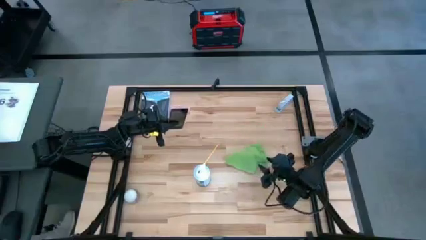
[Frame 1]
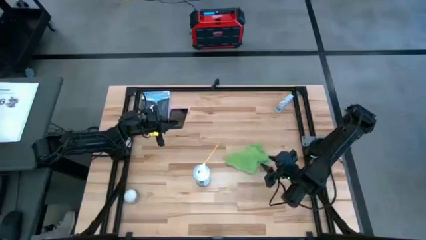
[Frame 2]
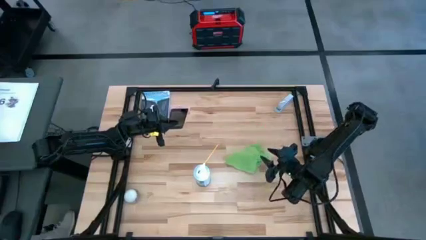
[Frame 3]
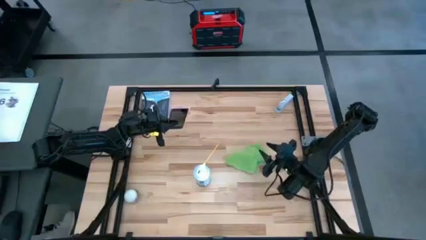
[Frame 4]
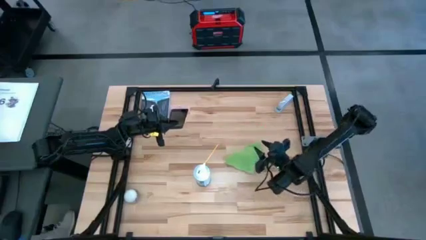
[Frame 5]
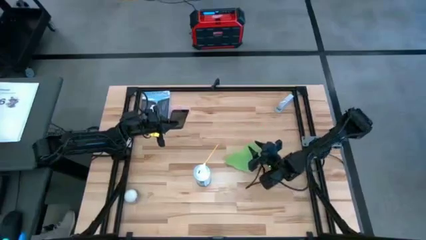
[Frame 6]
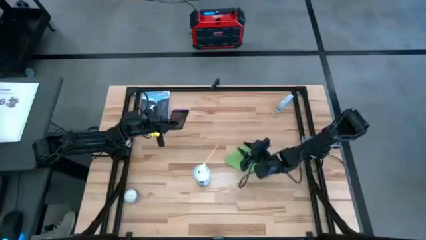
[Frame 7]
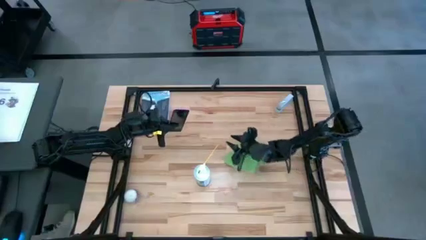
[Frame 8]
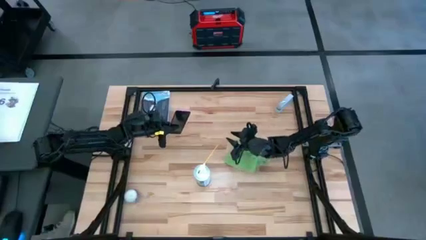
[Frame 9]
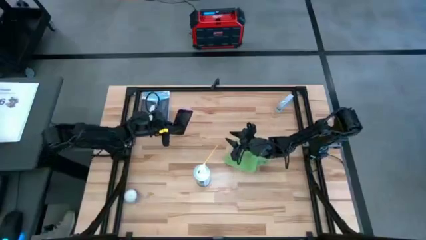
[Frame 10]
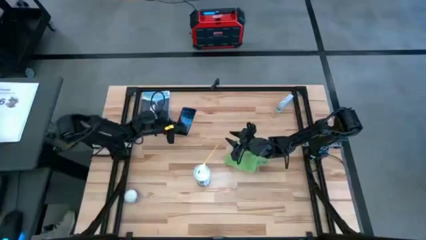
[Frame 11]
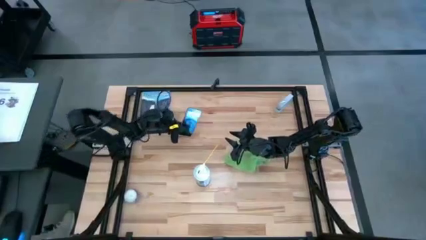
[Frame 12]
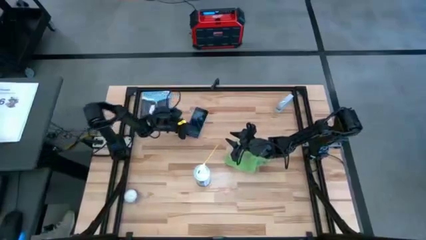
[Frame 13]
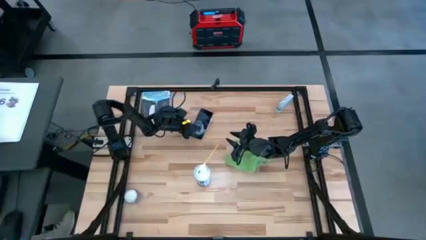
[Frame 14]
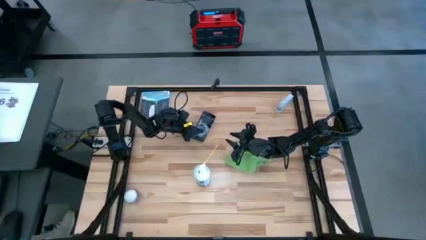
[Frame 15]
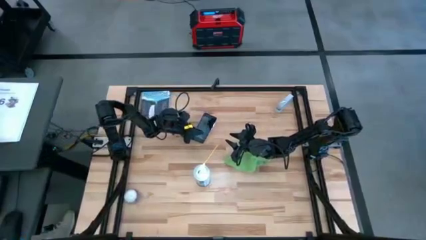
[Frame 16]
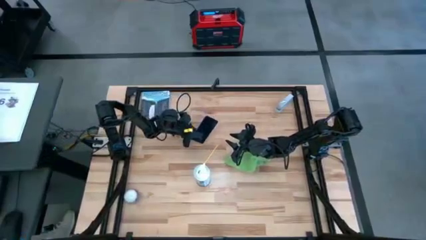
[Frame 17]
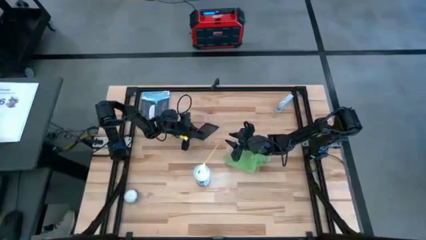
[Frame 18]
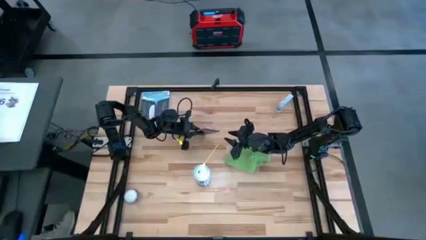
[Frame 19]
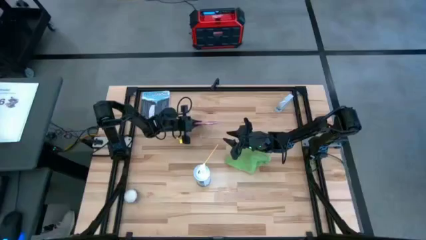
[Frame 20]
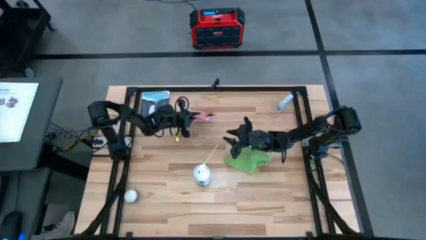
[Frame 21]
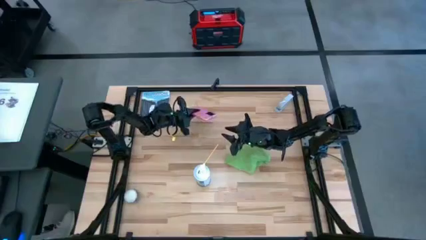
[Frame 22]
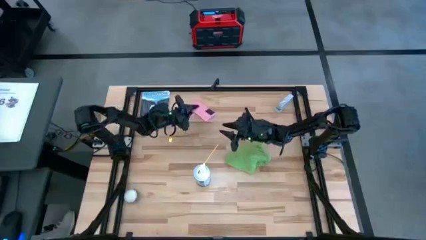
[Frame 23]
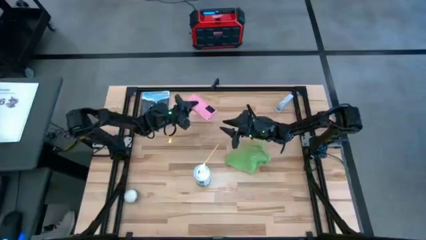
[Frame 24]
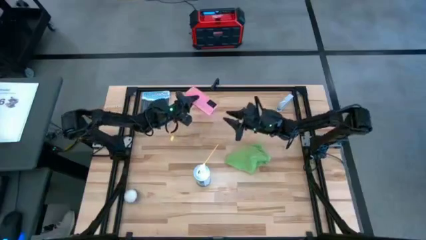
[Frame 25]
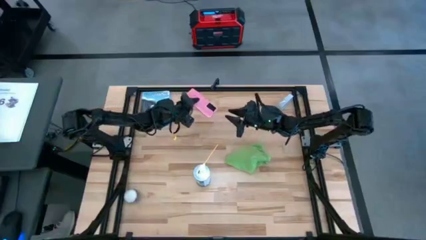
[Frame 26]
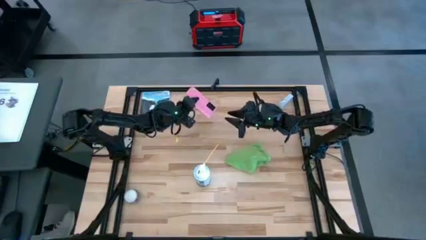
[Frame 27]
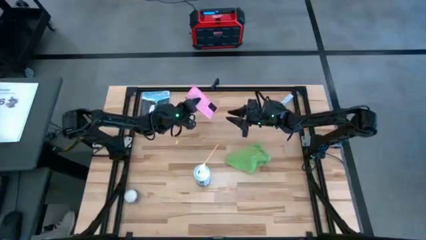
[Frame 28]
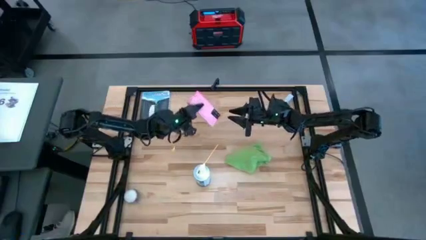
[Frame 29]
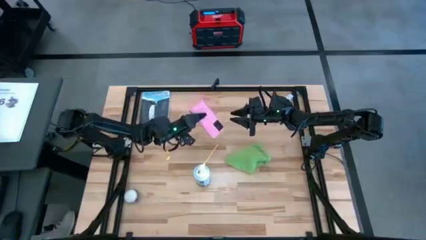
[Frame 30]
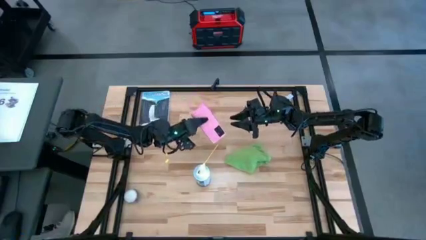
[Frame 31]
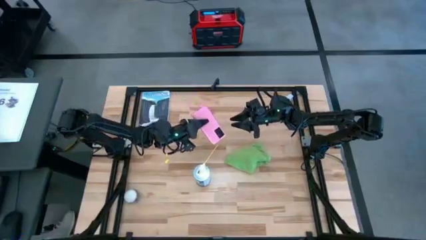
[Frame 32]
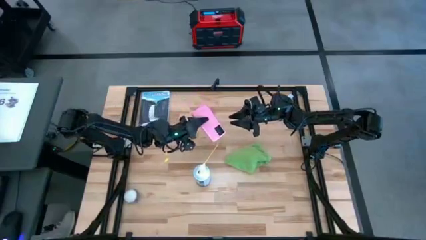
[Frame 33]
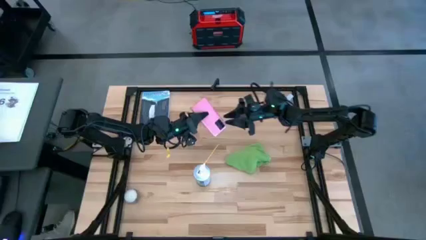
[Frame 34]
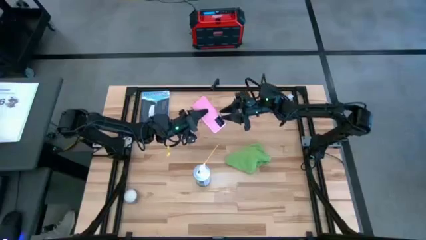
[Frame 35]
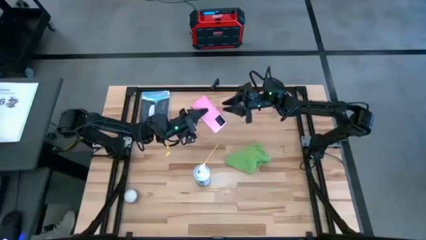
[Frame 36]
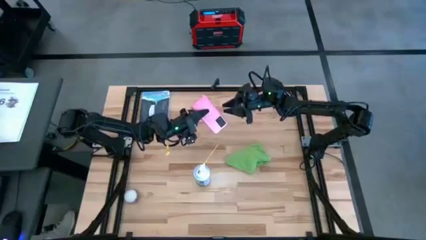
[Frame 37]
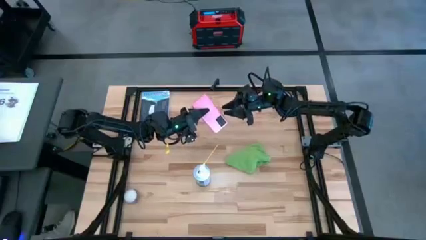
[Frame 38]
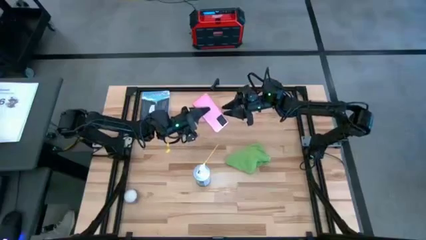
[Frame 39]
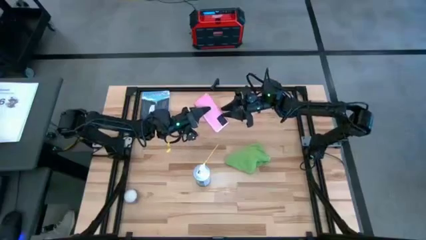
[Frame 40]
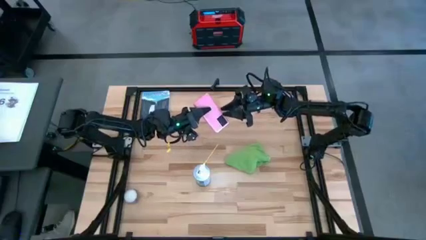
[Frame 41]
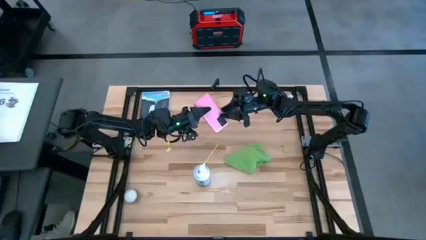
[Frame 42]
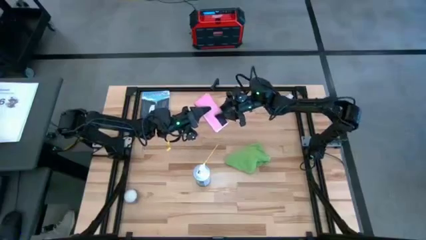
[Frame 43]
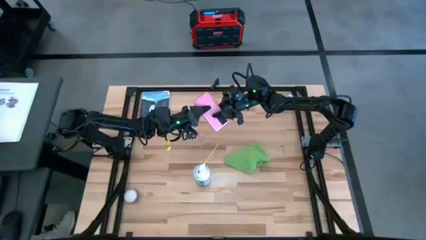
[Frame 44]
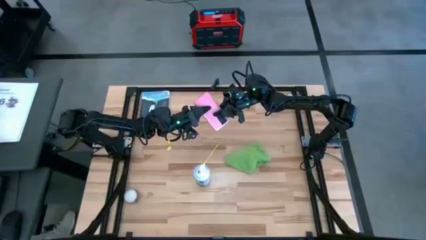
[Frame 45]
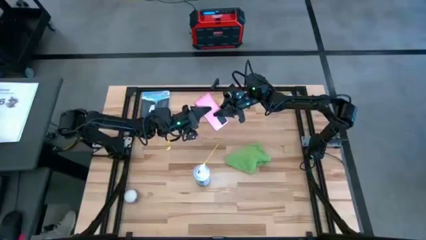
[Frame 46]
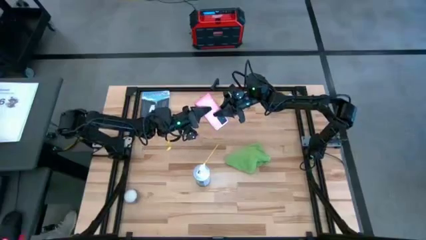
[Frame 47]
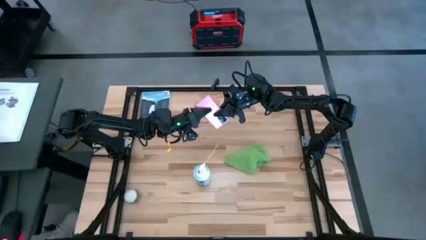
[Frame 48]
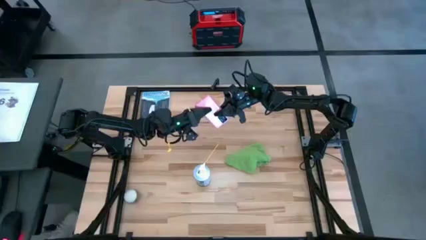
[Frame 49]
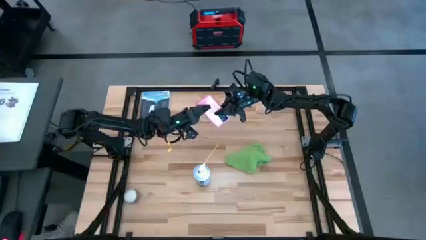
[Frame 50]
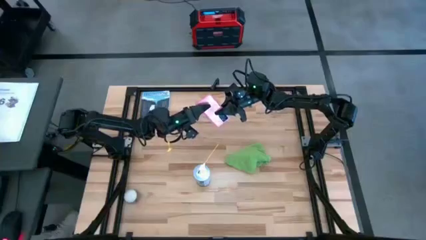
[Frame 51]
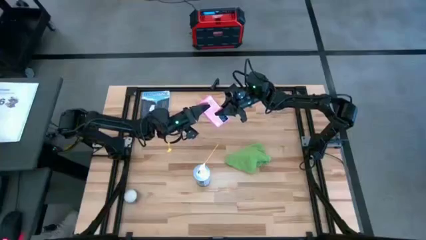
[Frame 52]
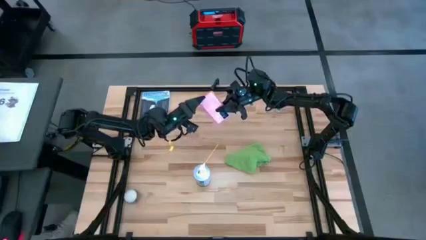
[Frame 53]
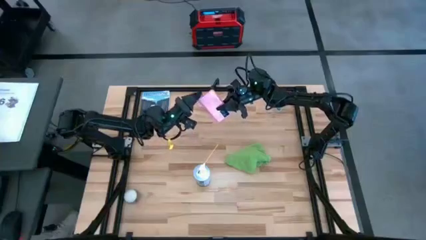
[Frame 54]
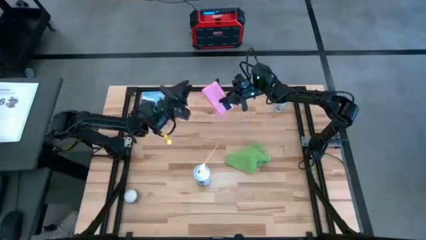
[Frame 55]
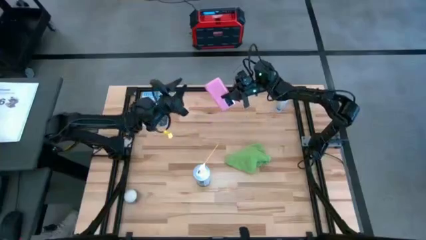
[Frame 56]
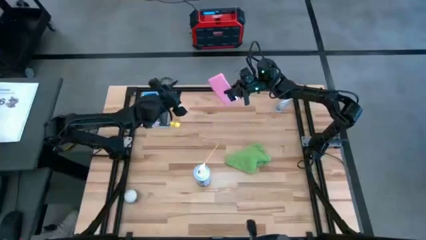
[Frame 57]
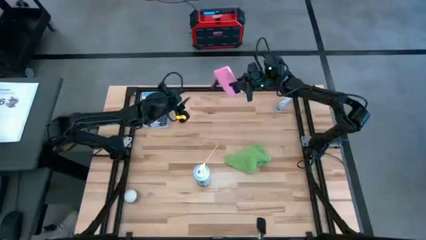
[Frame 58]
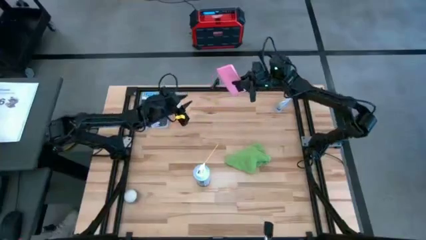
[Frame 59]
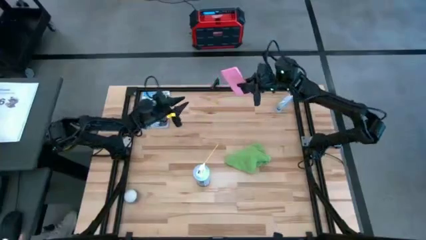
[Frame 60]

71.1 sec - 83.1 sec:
Task: Apply microfiber cloth
Spray the back of the black cellphone with the white spray bottle

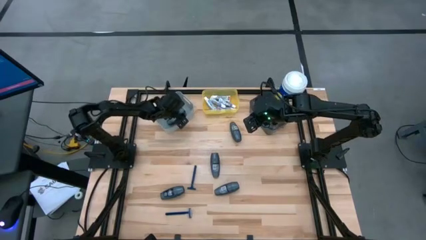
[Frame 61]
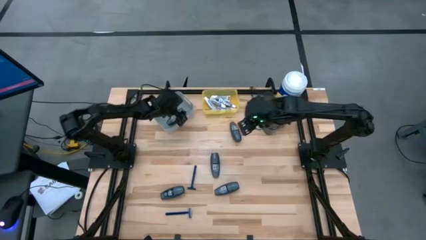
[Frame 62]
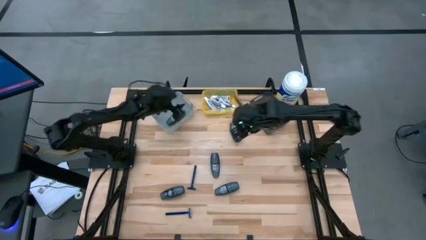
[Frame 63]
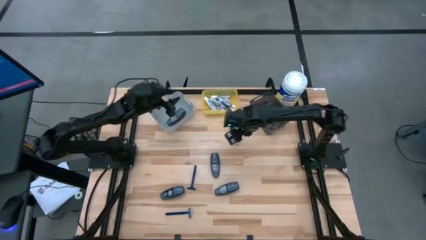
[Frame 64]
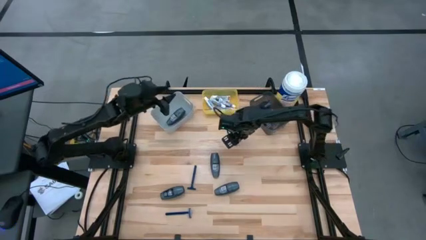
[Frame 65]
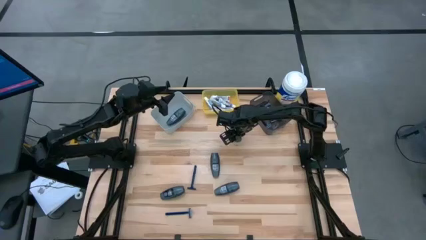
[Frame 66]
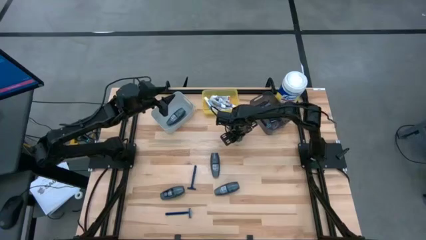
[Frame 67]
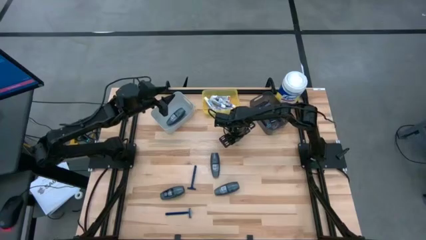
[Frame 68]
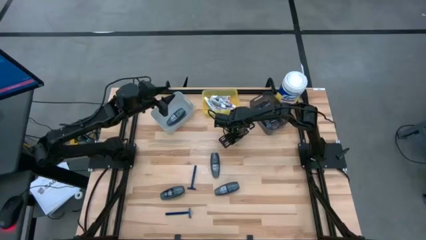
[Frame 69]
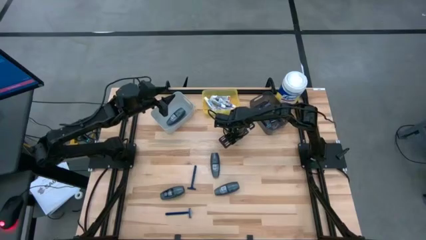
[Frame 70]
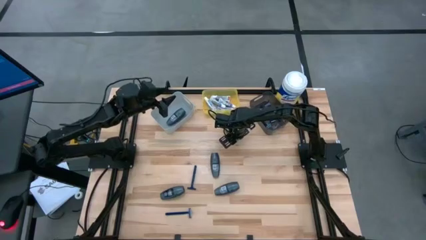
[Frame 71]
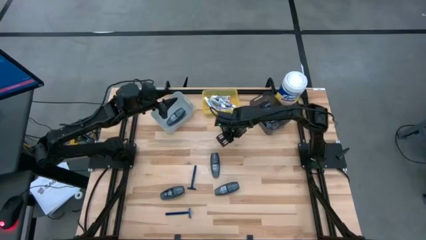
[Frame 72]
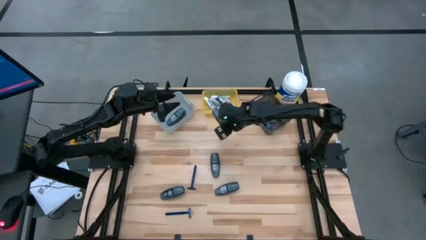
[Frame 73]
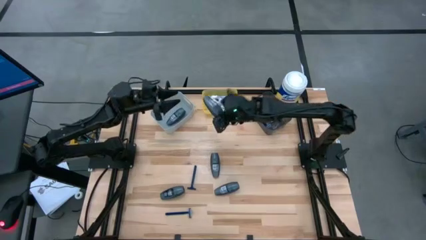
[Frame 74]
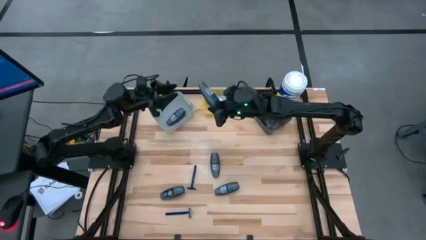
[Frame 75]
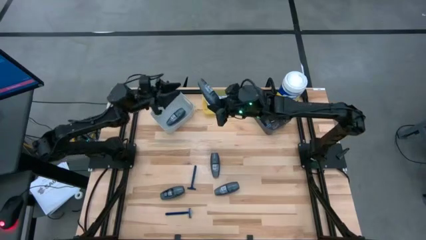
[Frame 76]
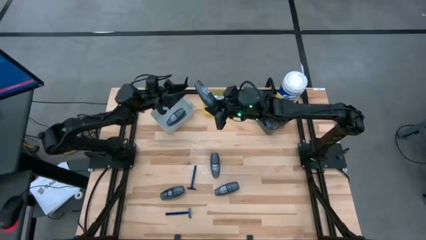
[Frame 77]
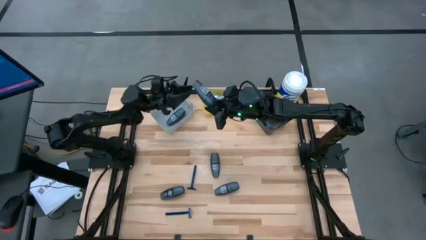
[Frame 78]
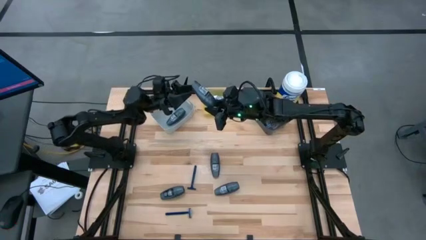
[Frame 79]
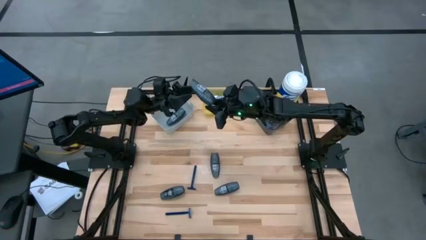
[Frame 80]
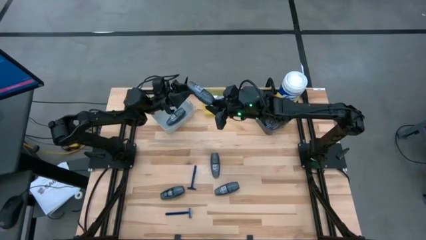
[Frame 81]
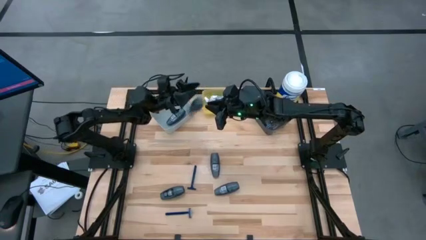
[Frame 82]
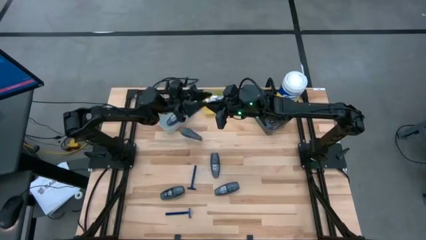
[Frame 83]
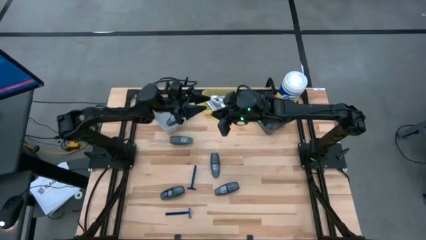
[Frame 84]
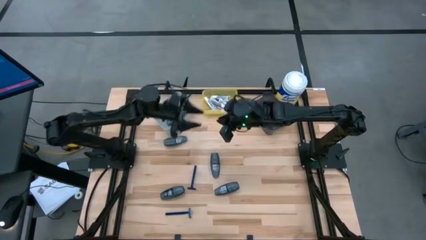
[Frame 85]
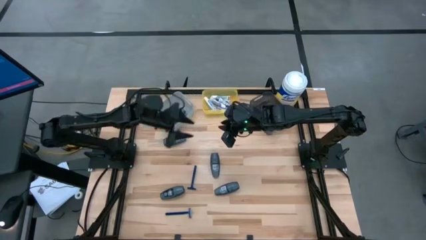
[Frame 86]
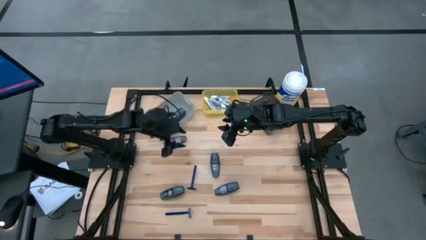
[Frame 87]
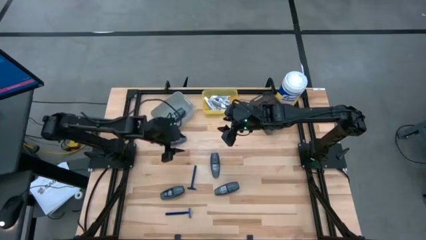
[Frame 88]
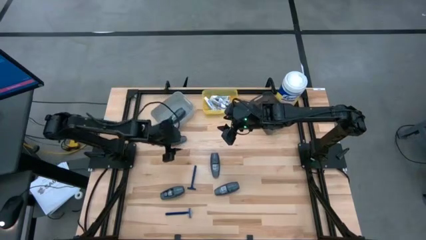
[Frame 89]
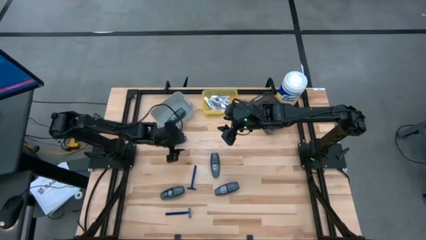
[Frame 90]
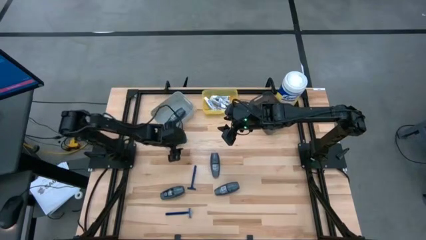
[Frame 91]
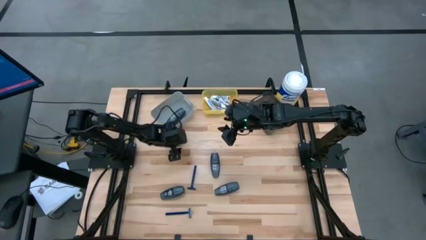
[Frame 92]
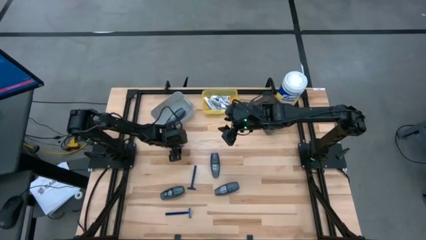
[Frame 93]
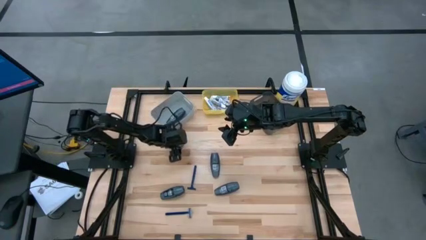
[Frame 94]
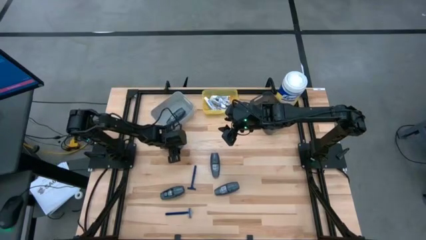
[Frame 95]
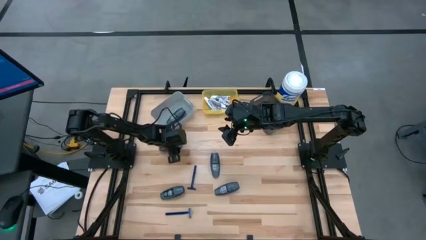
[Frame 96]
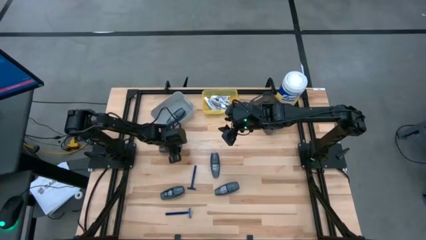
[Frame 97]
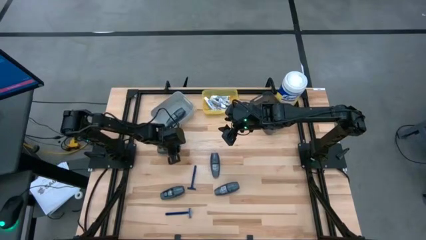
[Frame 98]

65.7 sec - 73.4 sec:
Task: Pick & Place Travel size toiletries
Put the gray deodorant into the gray bin
